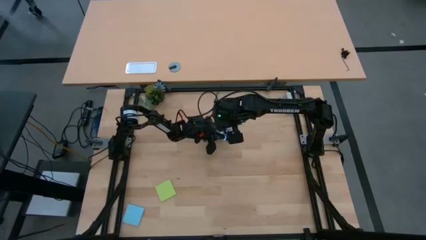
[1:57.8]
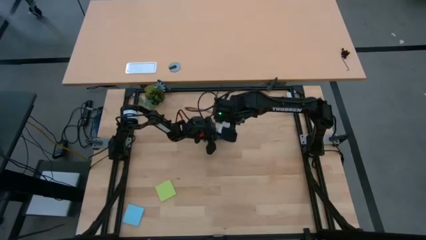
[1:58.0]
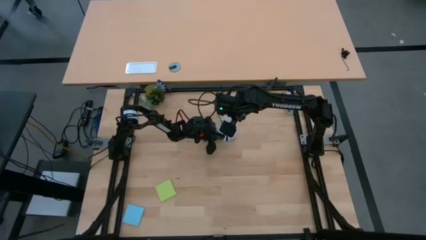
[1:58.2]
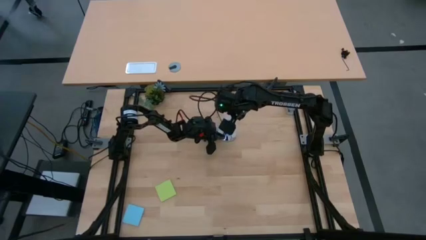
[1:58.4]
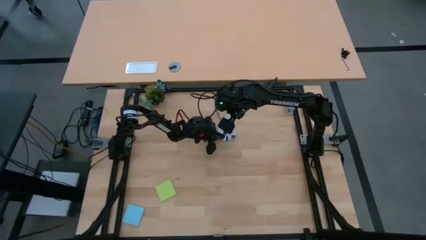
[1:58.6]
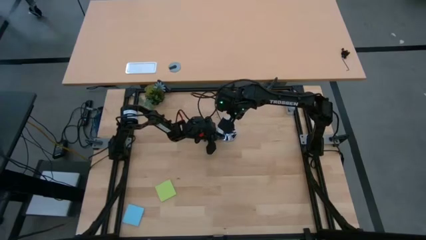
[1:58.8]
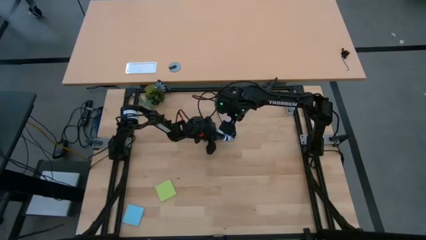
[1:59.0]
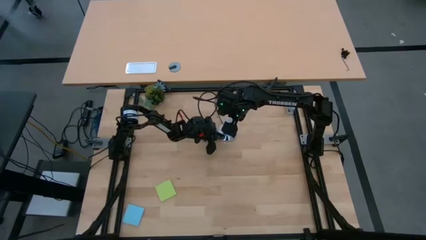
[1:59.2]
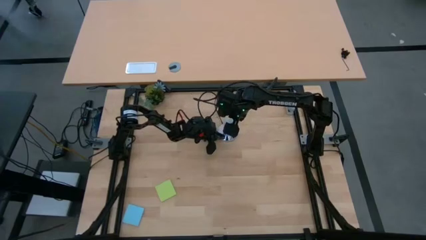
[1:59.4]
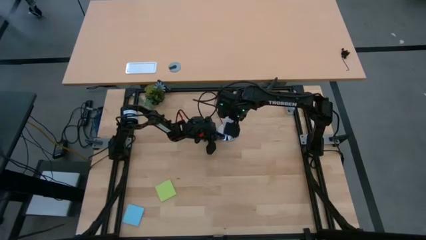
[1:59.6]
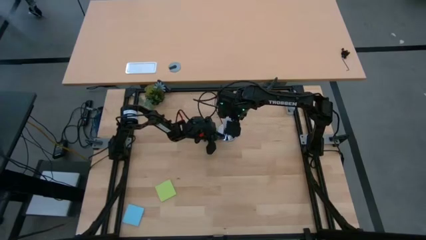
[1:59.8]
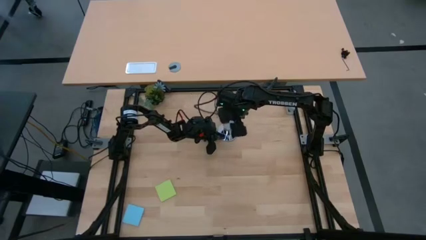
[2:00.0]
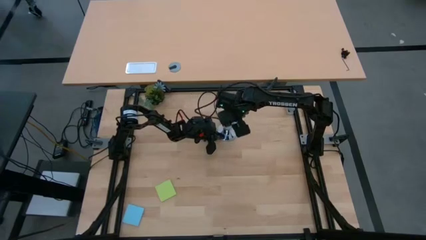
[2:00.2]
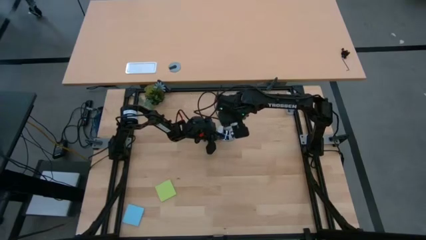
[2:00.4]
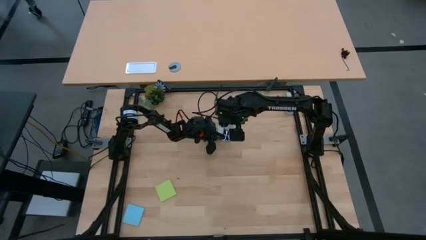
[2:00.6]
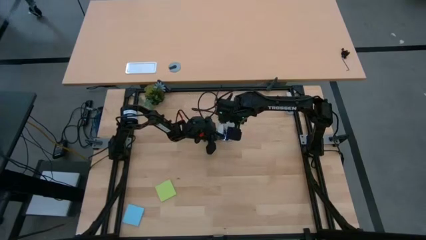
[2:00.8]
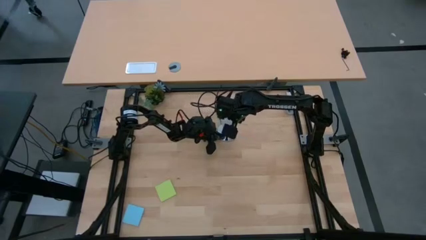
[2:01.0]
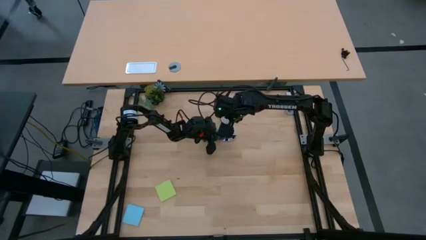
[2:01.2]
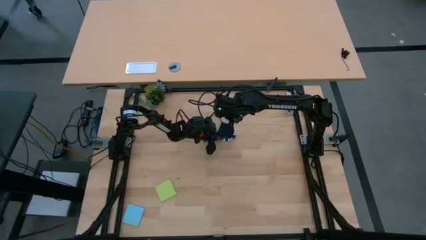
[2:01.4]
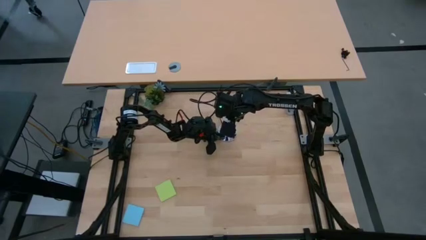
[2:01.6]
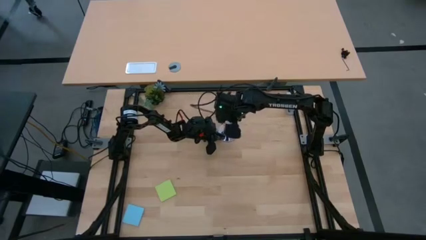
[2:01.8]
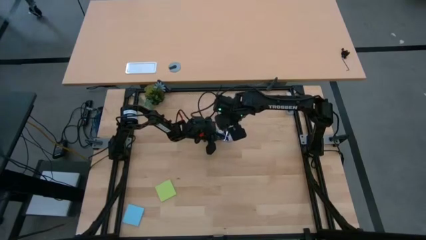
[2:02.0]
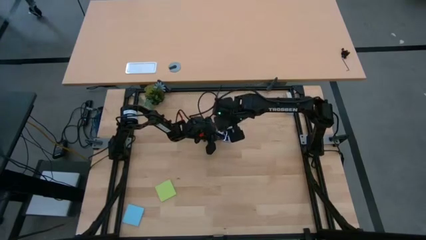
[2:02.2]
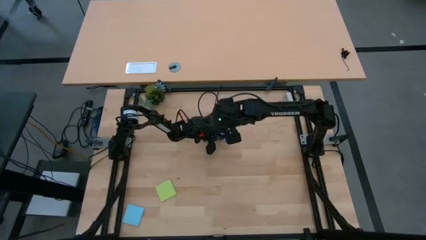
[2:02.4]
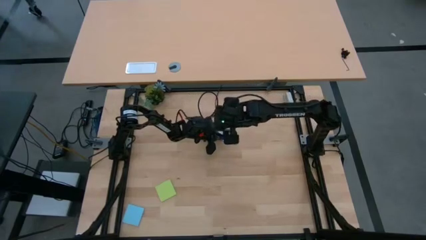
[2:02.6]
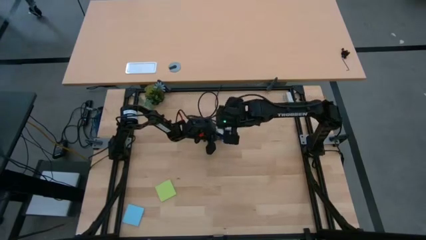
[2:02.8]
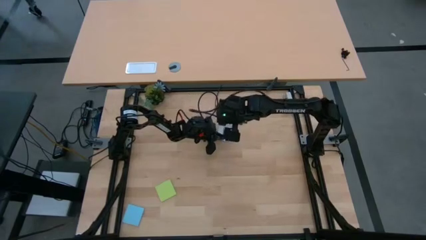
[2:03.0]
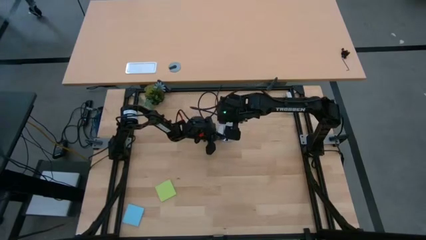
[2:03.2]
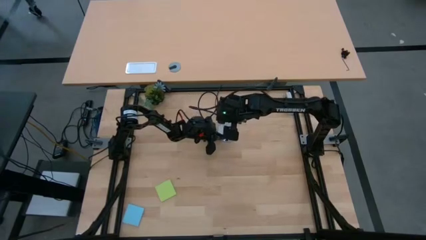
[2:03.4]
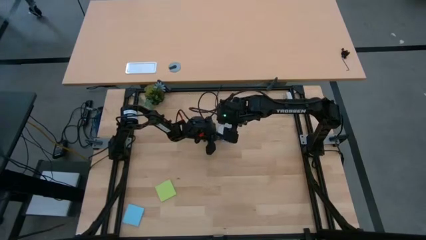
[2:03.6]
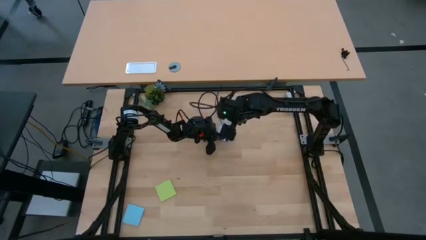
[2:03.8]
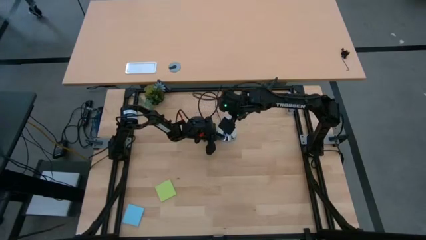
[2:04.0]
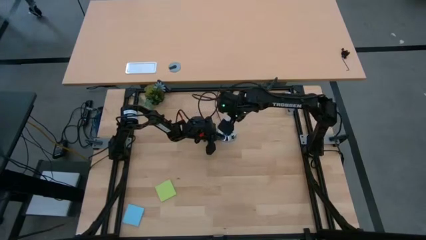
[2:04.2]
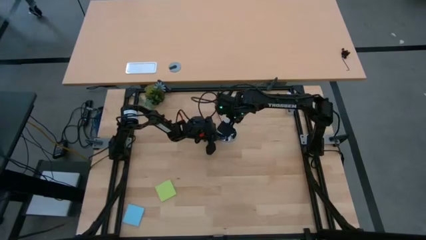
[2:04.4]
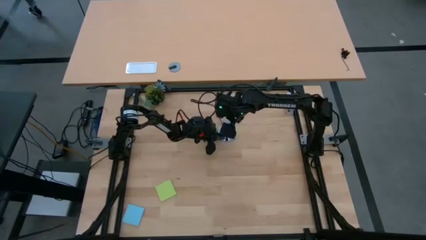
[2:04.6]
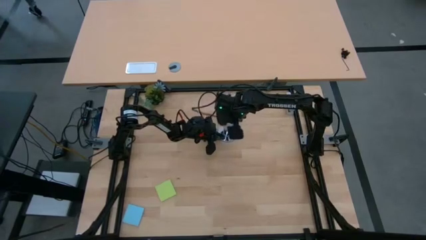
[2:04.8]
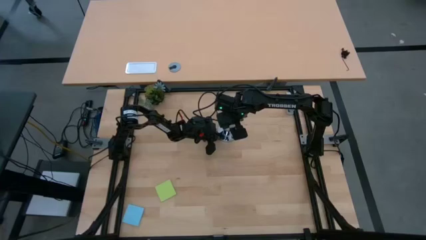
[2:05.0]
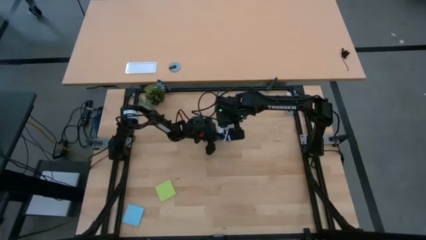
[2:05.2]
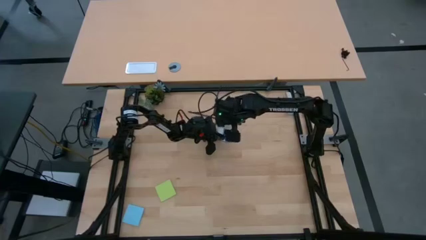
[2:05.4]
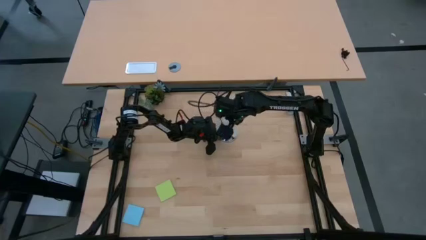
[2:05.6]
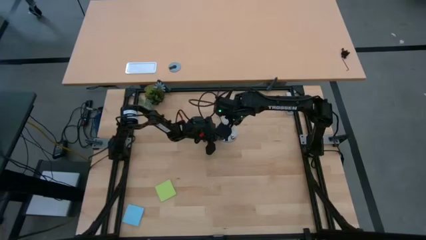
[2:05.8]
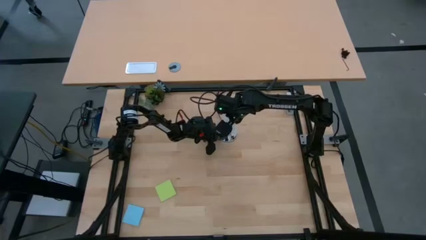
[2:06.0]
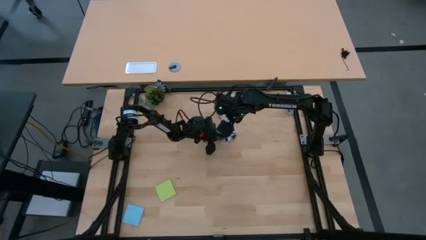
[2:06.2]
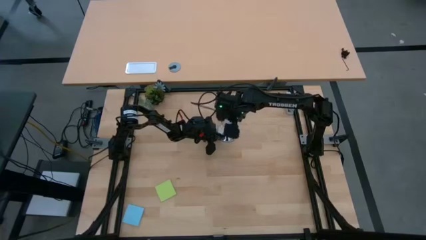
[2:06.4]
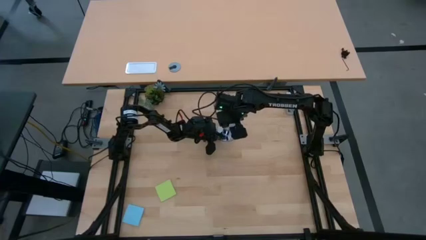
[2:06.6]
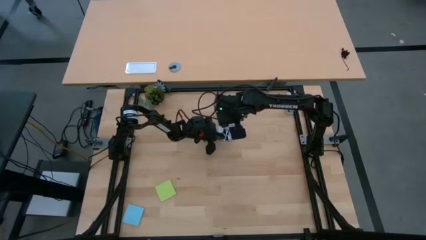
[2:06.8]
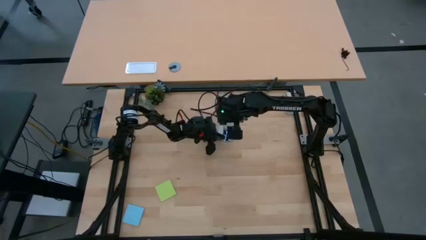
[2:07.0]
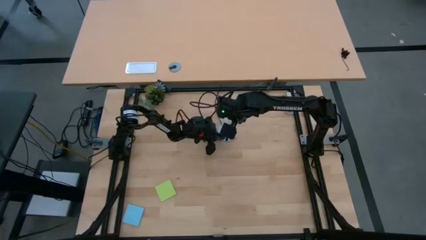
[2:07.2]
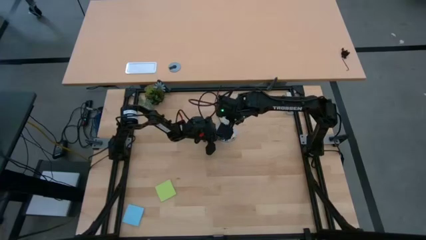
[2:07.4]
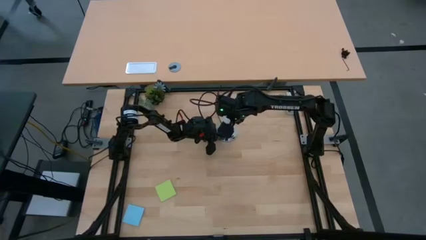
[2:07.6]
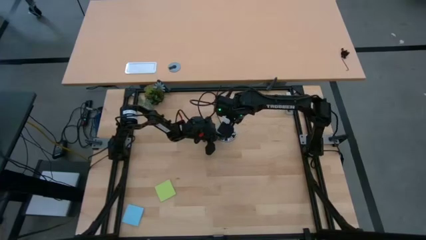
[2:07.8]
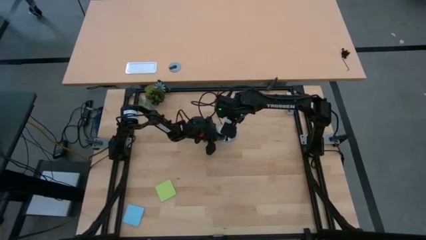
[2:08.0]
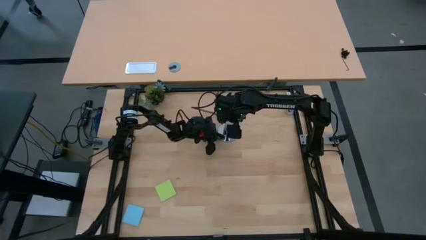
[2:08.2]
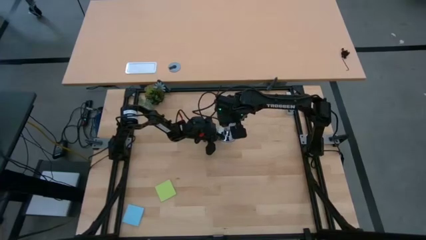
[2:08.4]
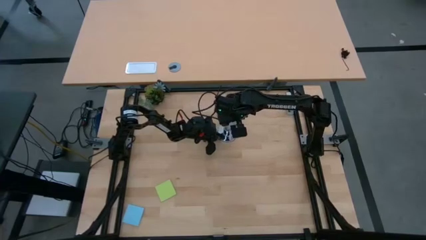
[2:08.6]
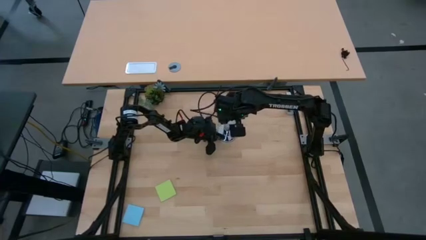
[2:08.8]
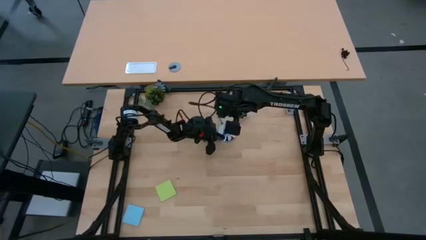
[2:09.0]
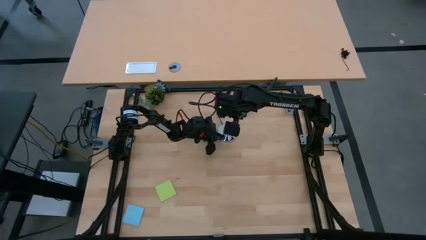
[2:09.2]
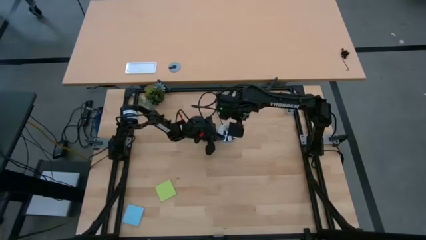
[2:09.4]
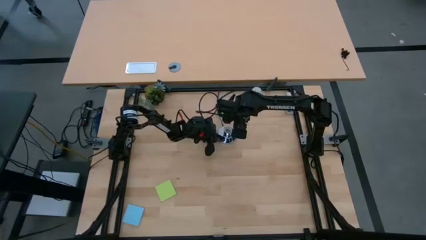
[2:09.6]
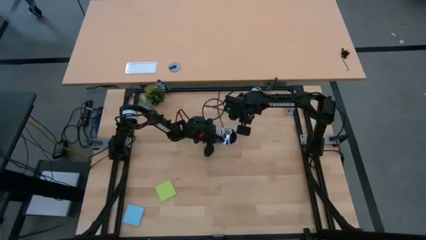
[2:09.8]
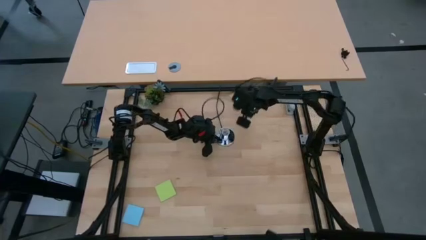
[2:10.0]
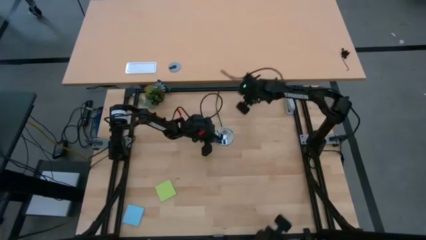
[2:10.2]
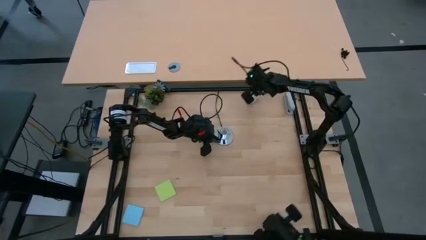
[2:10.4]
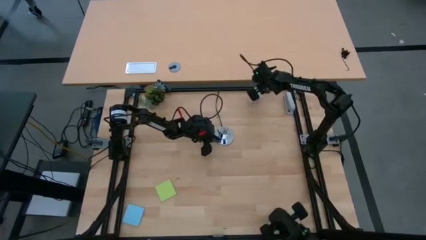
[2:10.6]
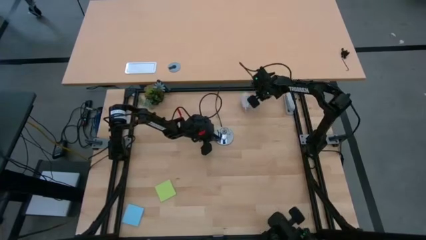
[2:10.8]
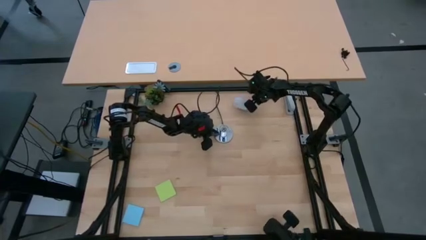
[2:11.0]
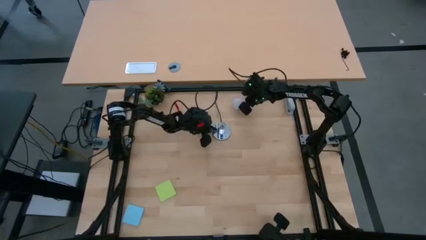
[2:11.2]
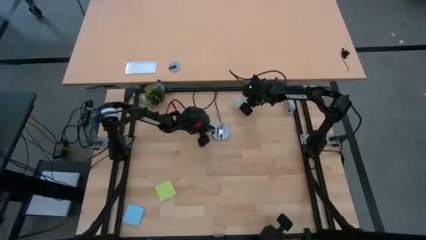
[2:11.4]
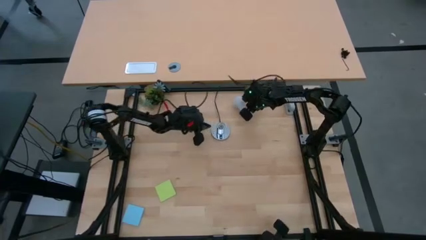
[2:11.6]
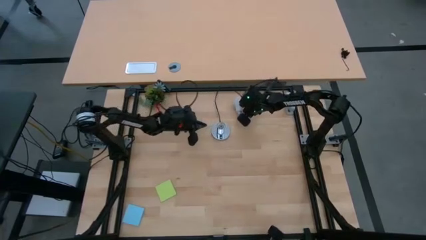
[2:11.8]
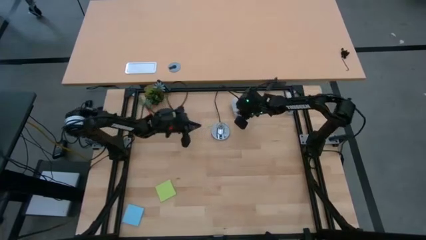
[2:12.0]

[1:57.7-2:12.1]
Task: Screw lightbulb
Remove the lightbulb from the lamp

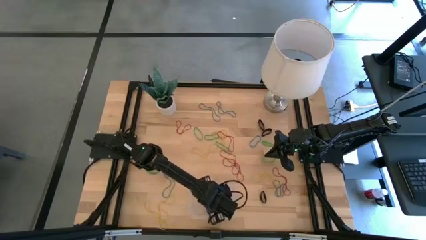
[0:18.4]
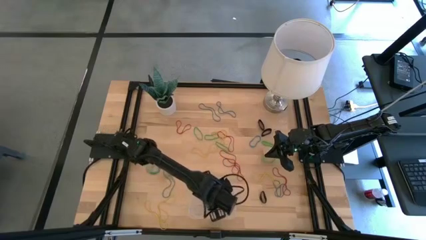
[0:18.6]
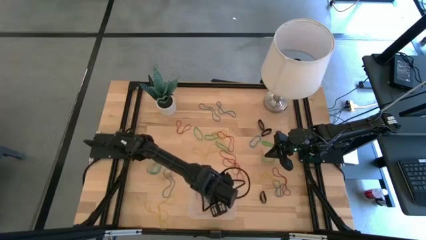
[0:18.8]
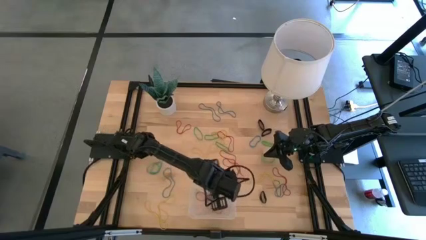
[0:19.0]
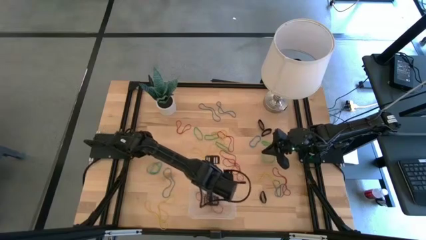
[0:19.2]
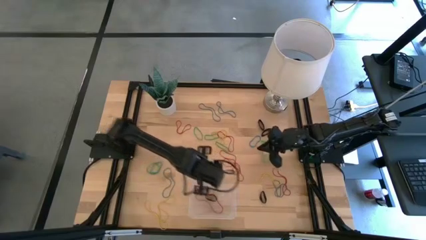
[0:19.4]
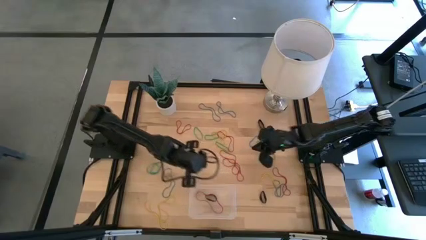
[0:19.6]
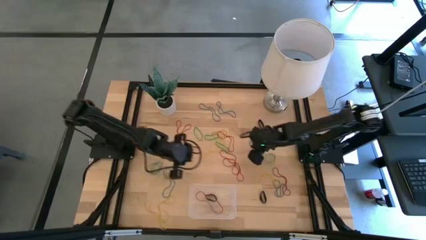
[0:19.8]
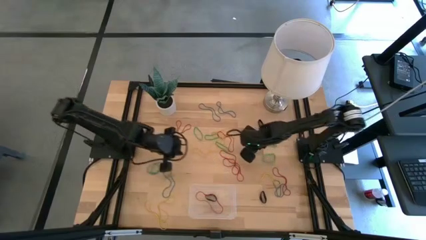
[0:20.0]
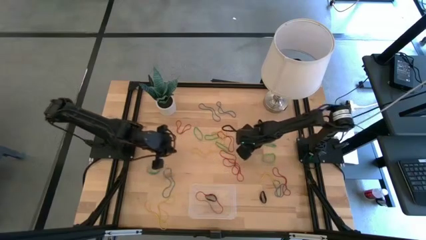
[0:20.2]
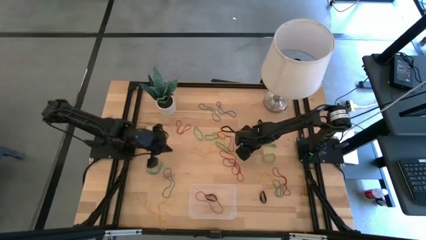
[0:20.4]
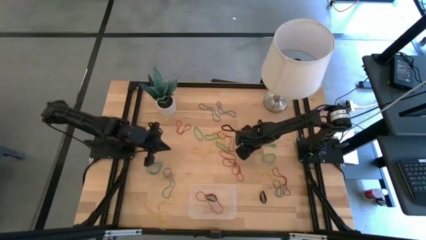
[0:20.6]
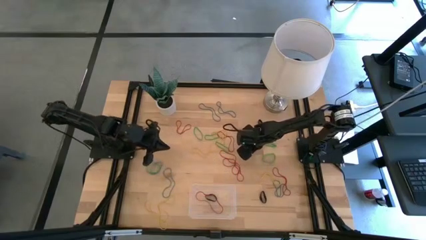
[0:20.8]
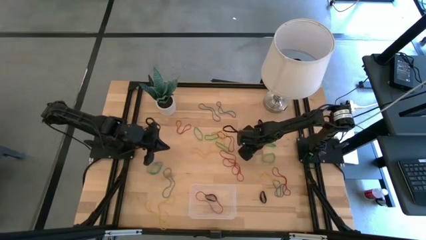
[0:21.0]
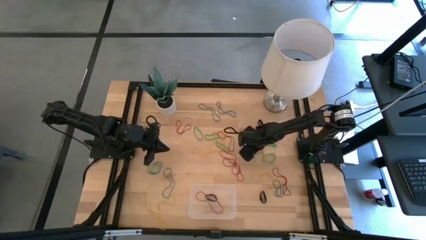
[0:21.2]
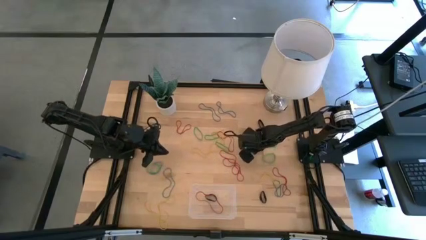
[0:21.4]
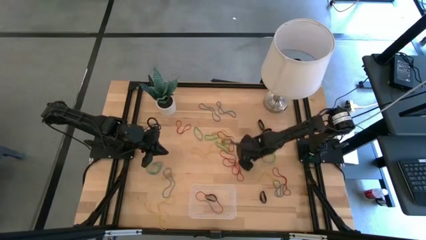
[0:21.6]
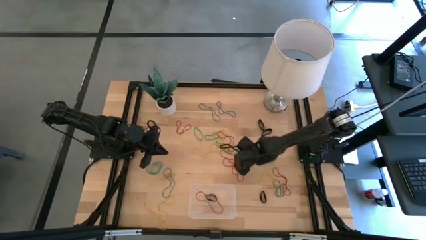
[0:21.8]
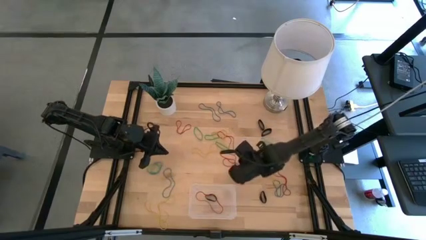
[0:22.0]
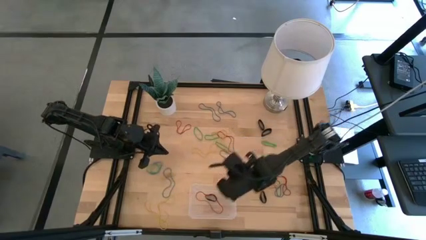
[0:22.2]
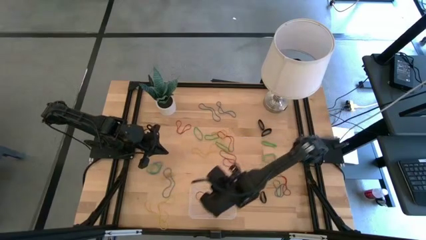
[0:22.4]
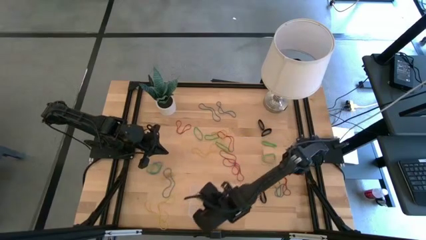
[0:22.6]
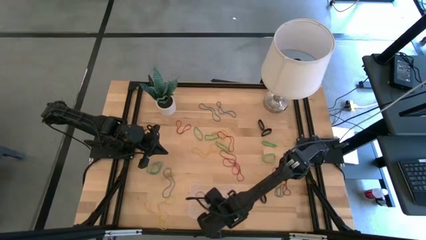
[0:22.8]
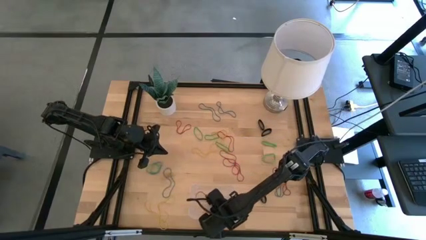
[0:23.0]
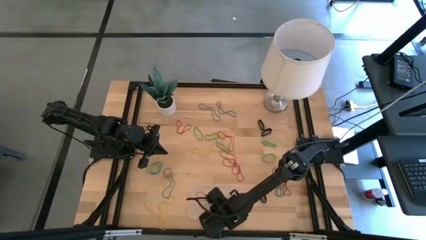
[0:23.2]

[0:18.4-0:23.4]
Task: Pick and place rubber bands into bin
Put the blue rubber band into the transparent bin
